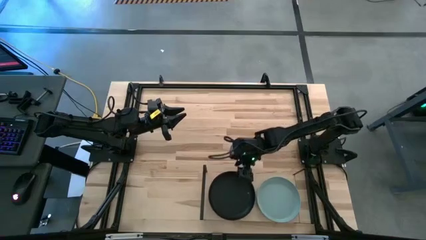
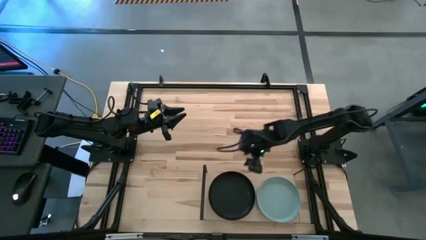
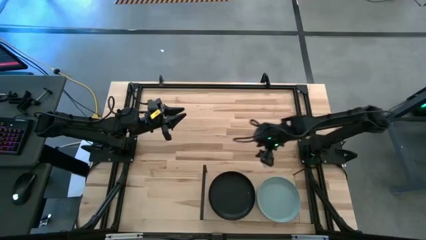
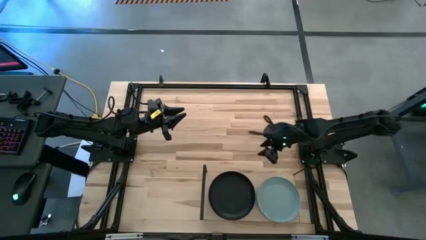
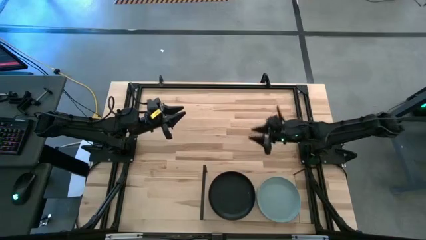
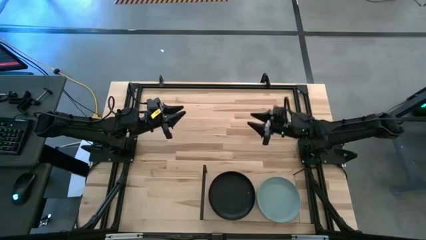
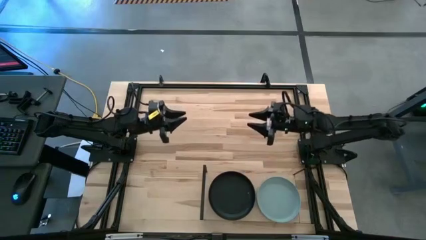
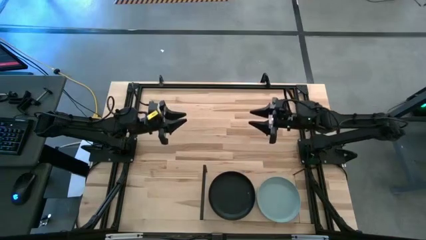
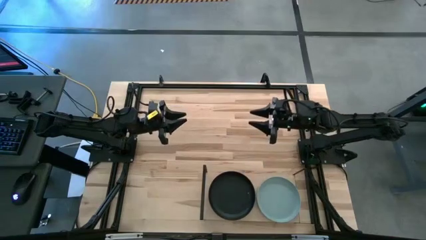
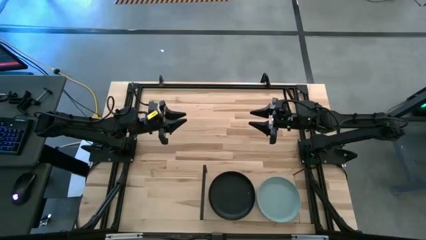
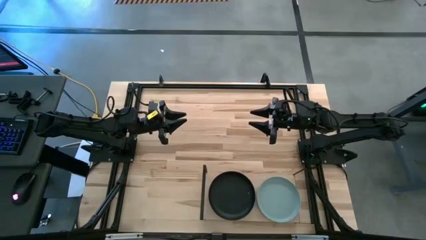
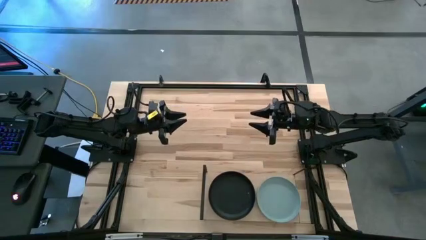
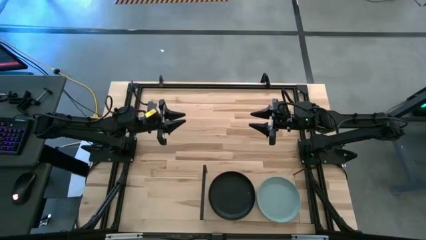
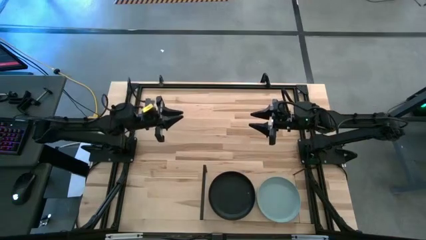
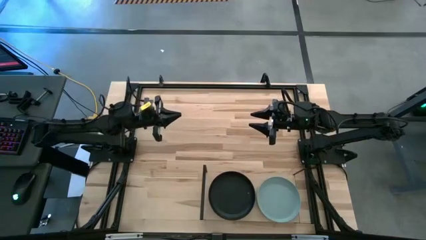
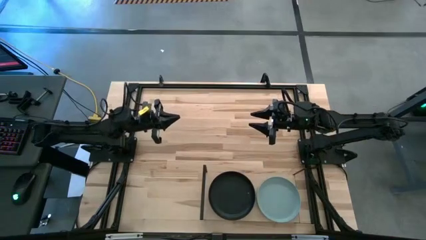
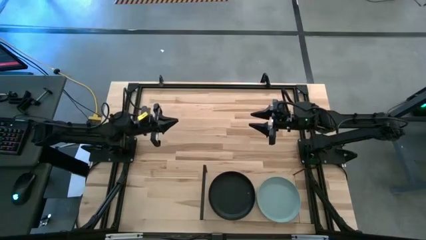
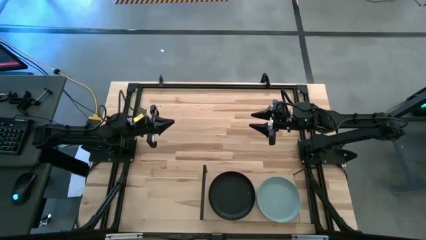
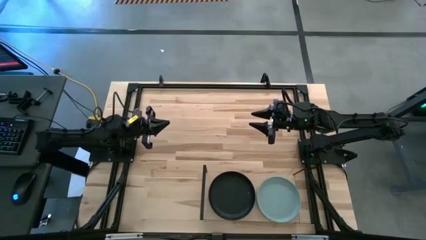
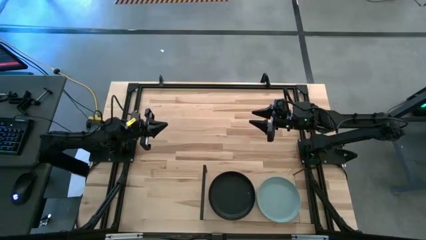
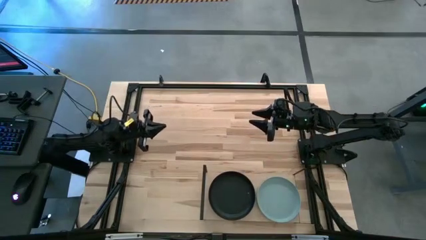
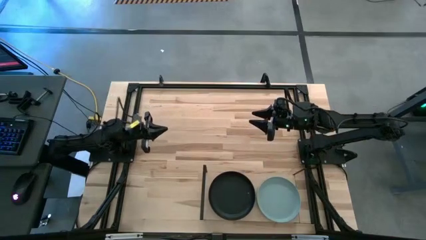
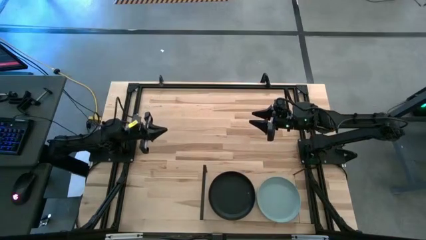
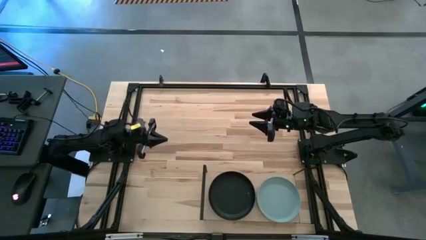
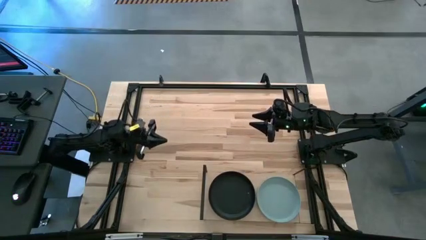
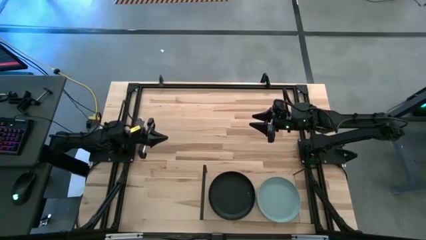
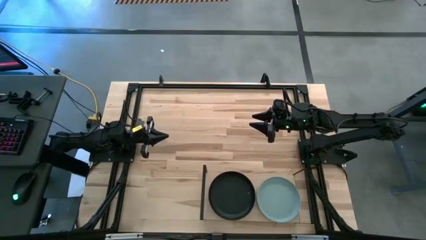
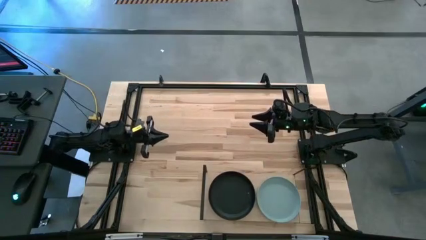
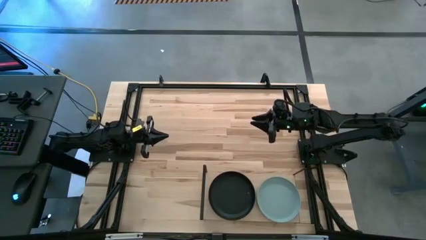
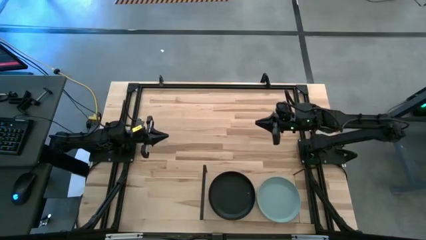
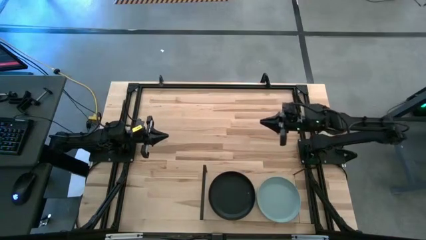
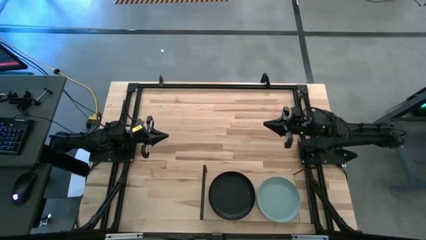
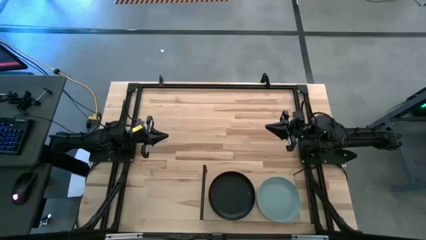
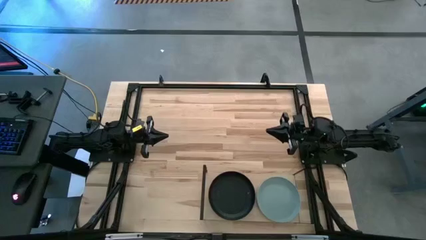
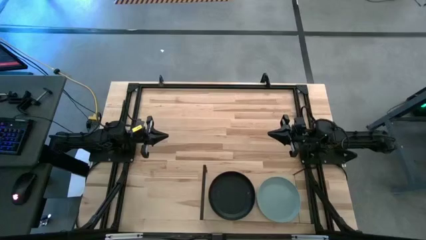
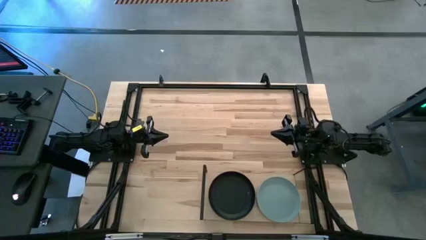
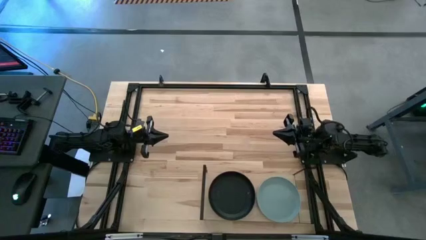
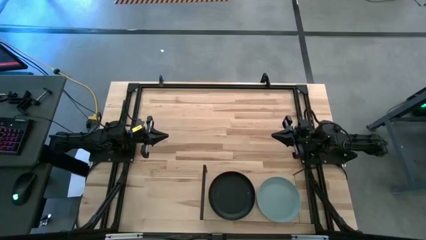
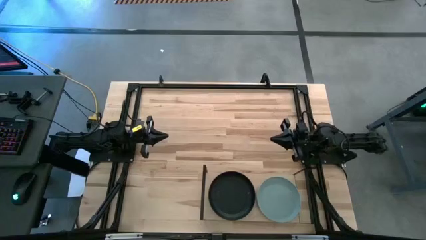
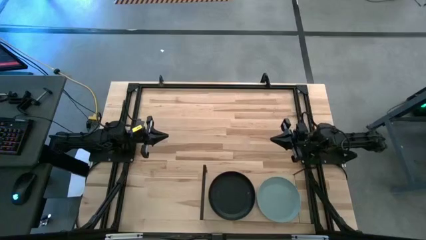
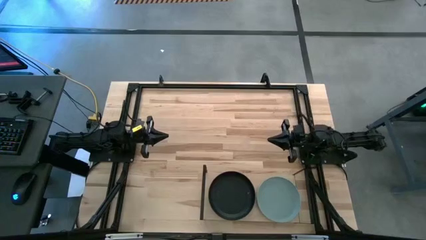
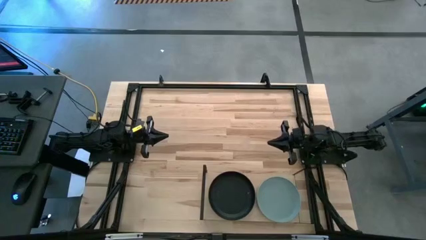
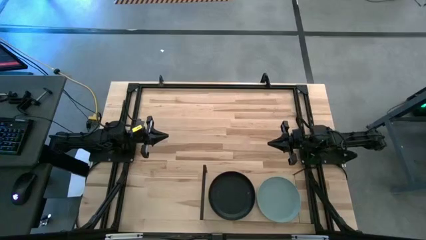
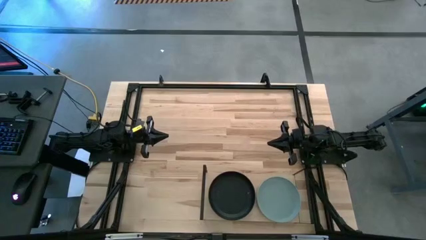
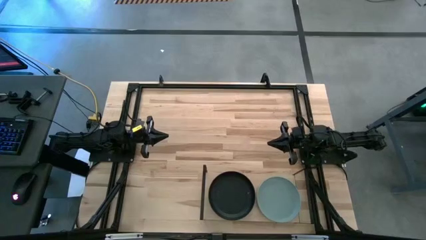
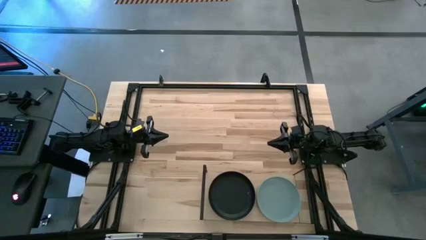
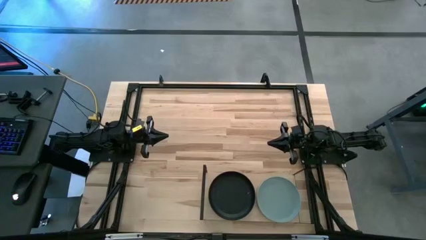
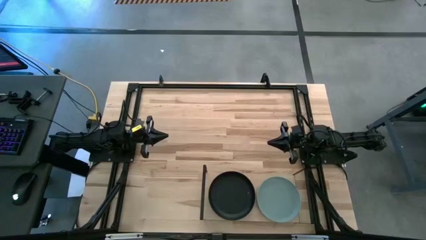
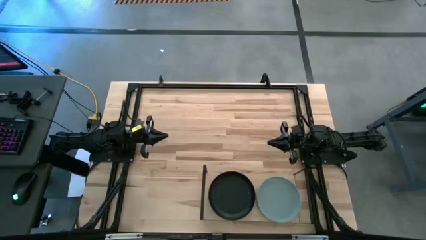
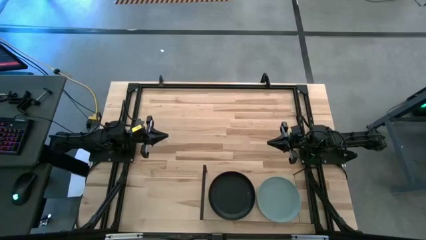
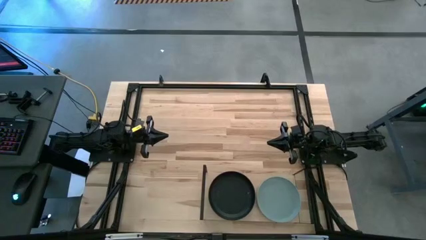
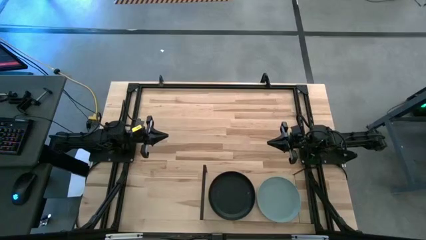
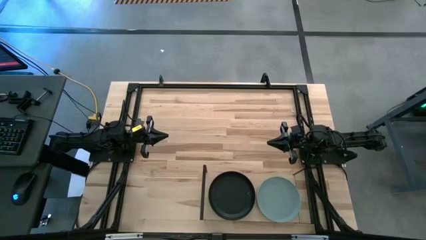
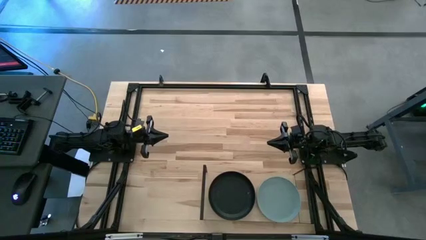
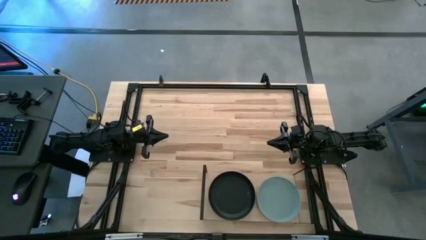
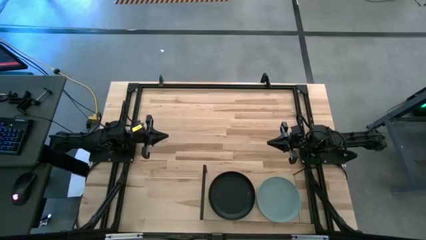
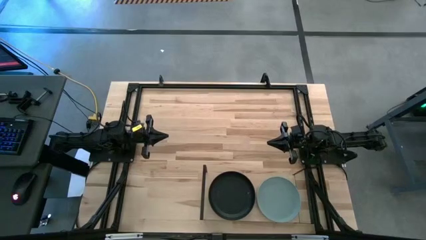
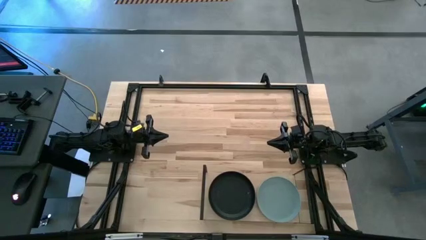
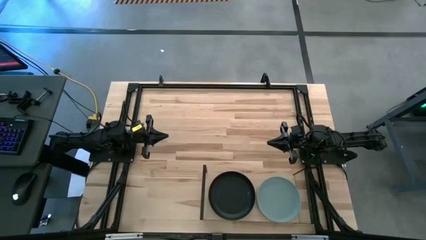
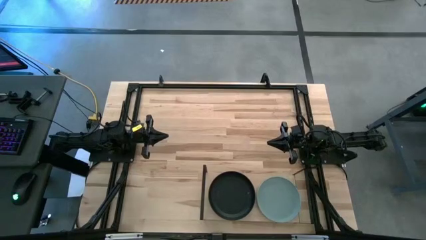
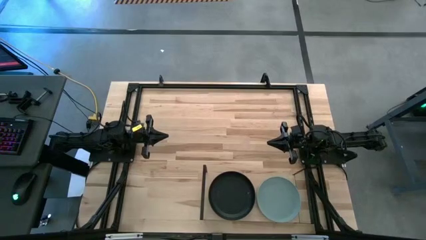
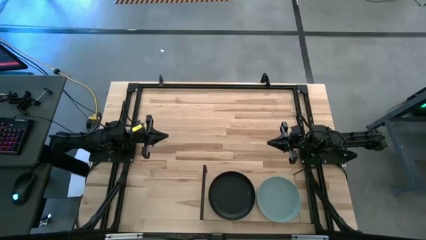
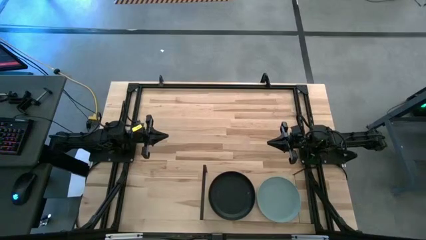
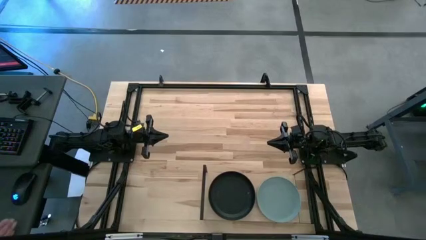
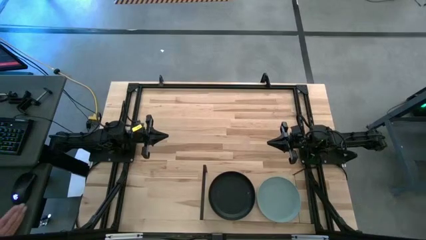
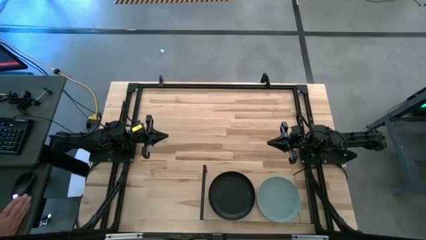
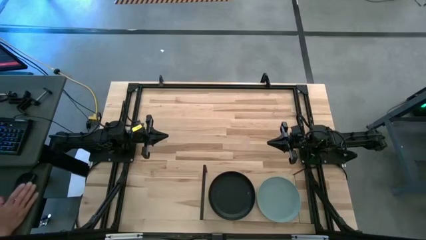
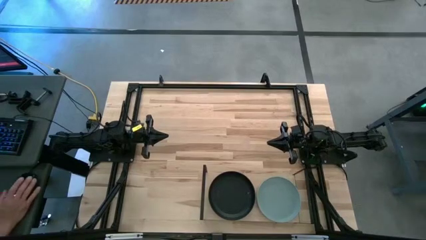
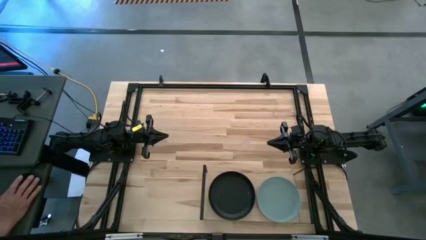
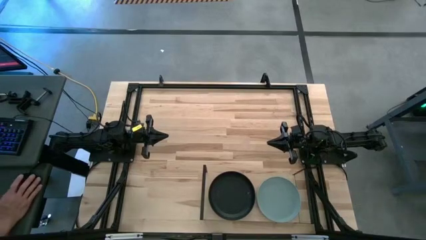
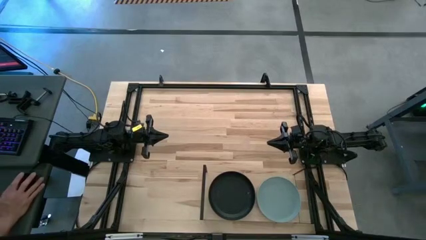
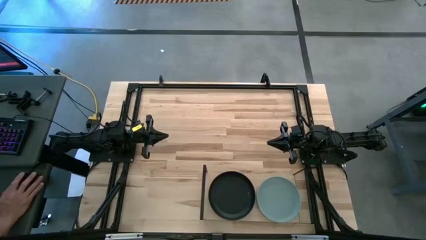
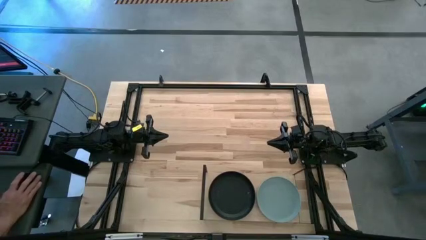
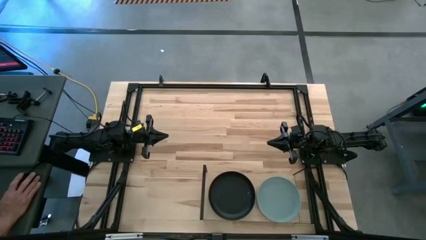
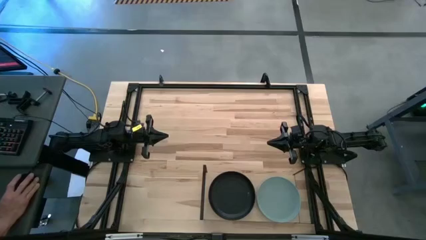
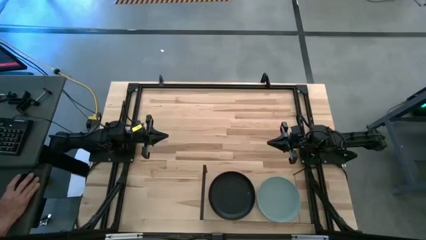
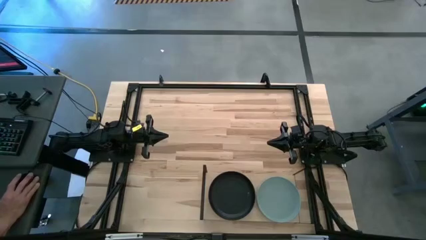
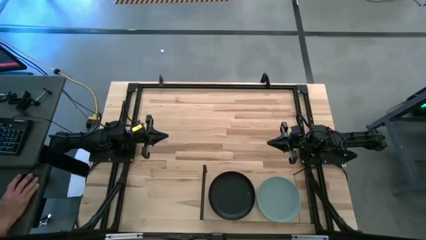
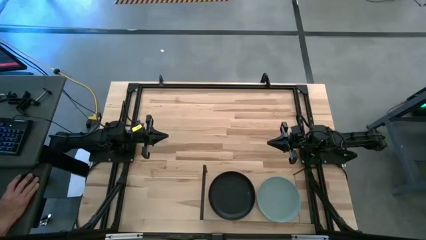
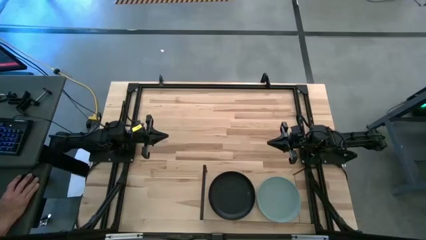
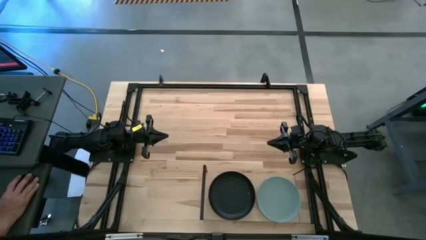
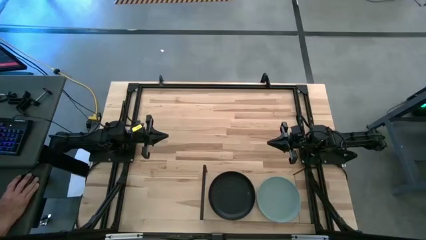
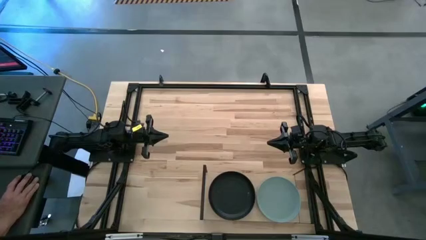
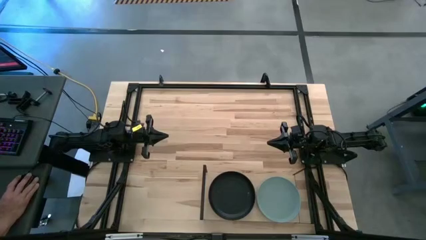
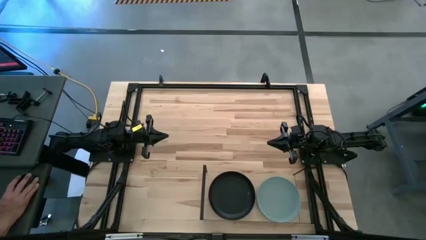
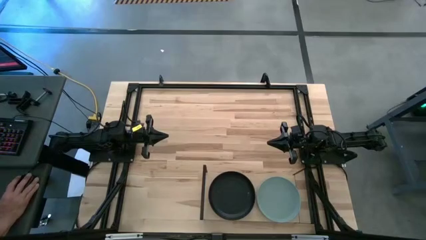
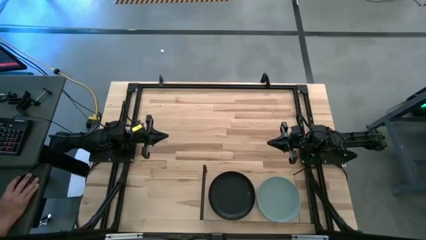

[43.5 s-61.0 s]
Task: Place and stack plates onto a shelf
Return to Home Position
